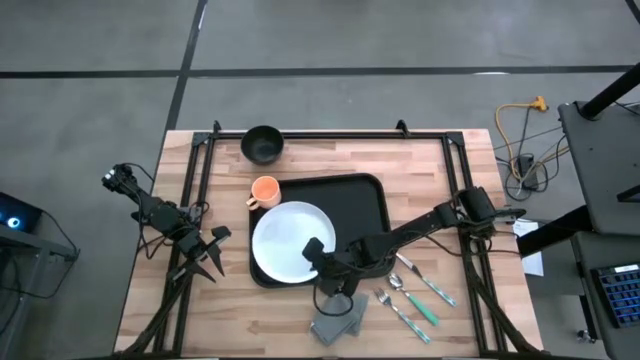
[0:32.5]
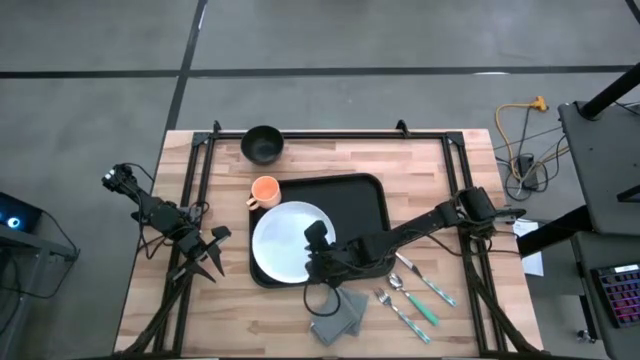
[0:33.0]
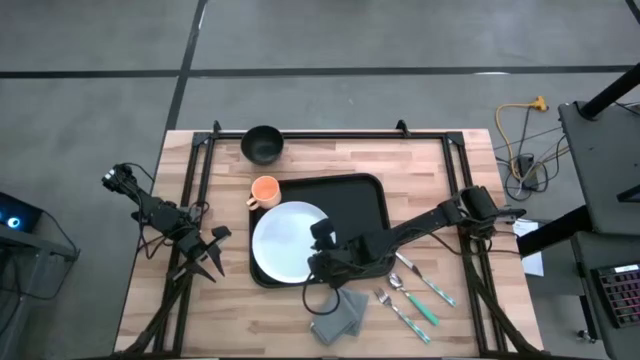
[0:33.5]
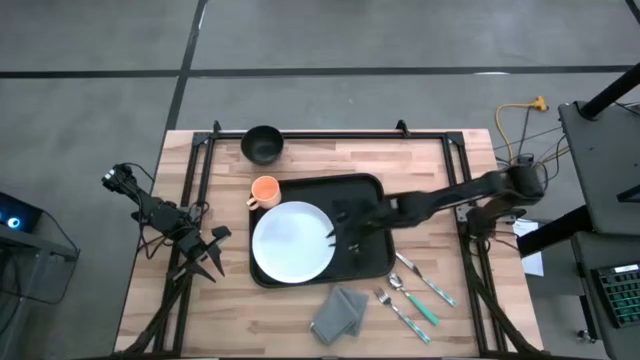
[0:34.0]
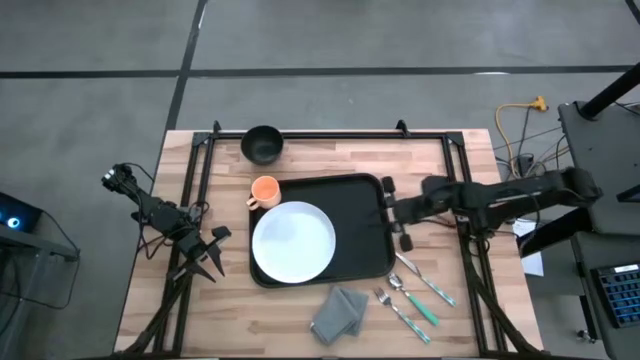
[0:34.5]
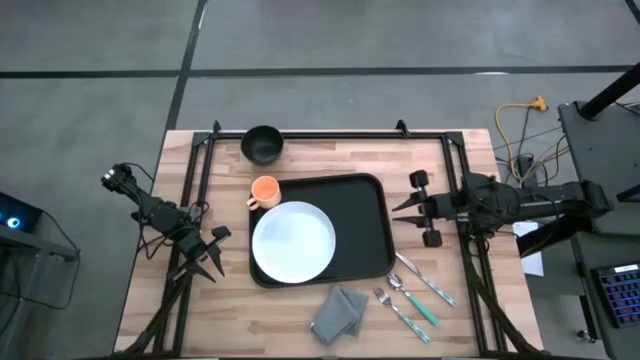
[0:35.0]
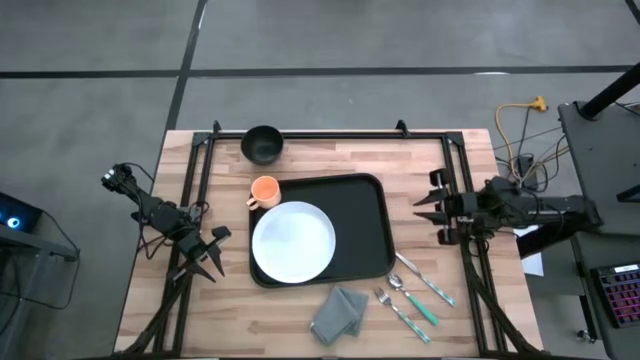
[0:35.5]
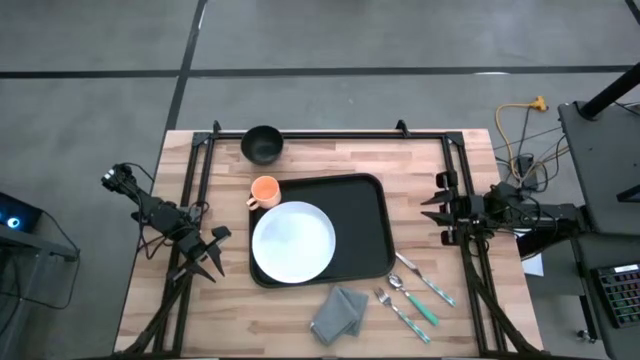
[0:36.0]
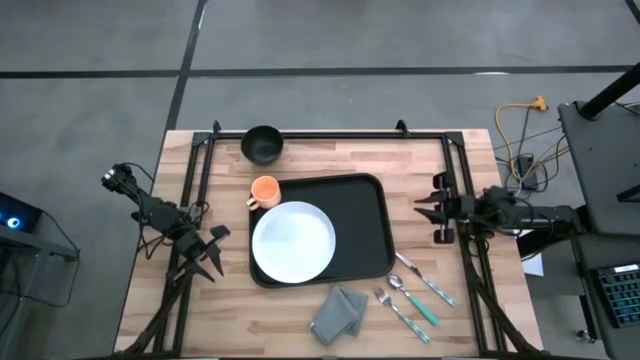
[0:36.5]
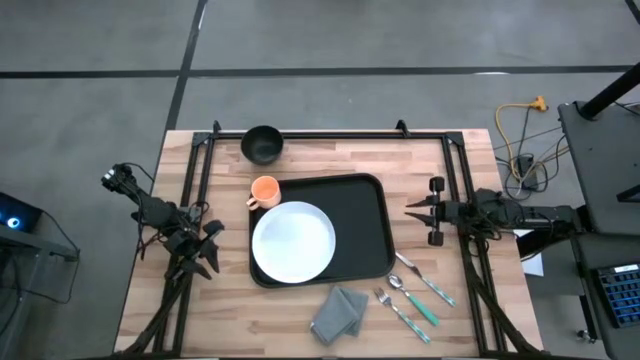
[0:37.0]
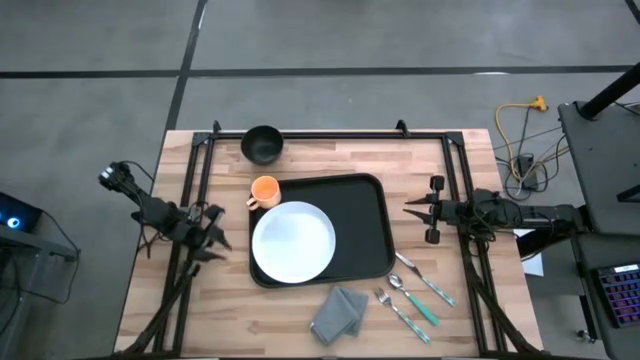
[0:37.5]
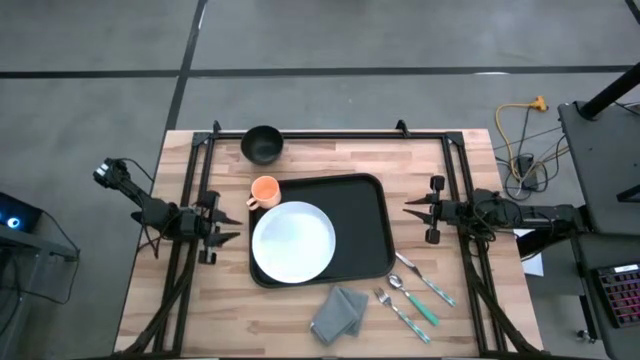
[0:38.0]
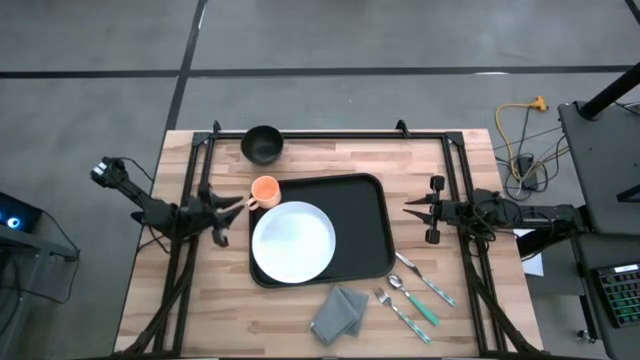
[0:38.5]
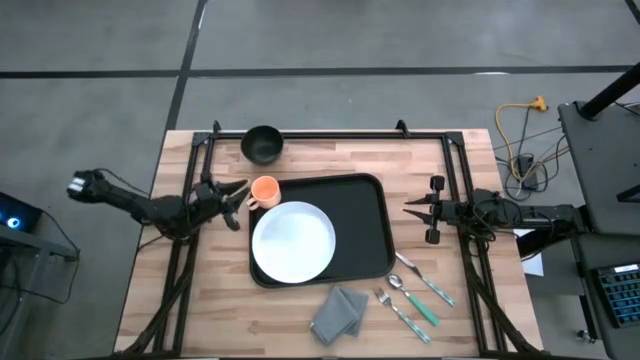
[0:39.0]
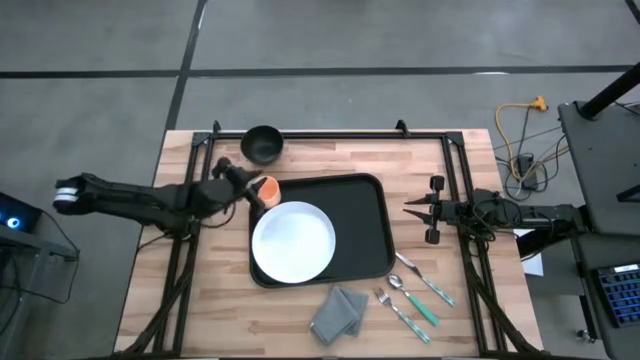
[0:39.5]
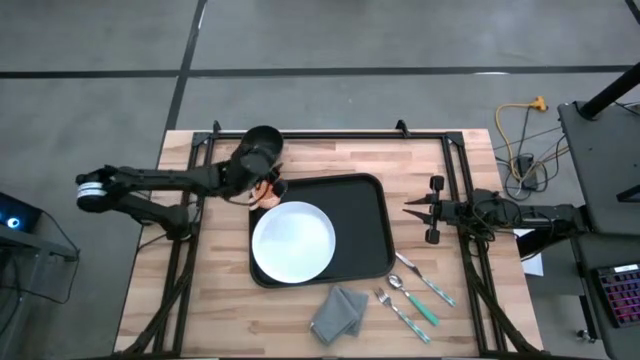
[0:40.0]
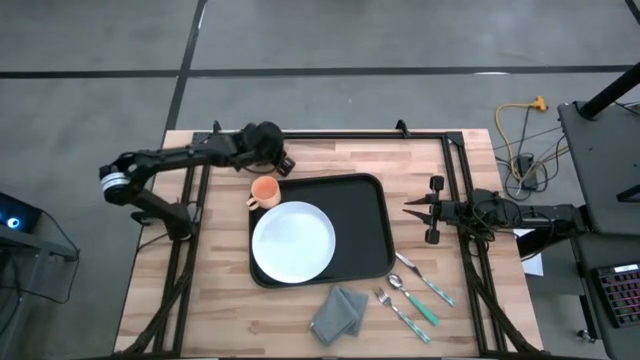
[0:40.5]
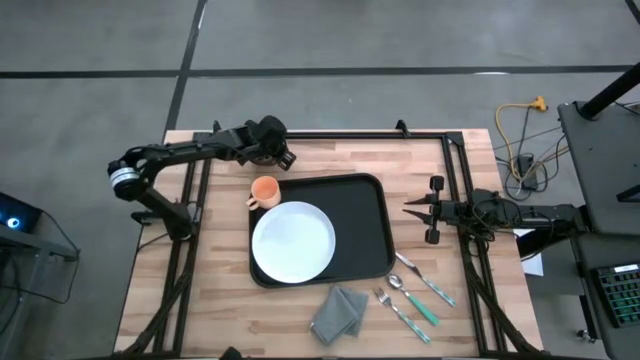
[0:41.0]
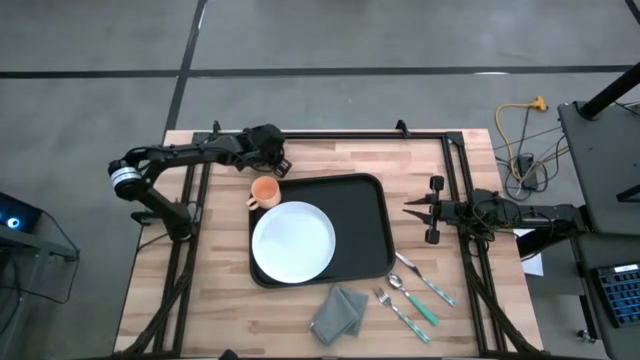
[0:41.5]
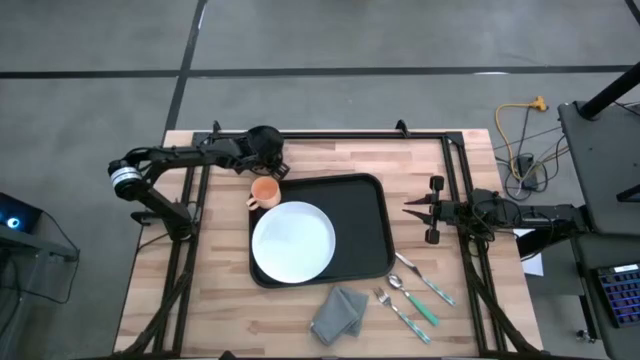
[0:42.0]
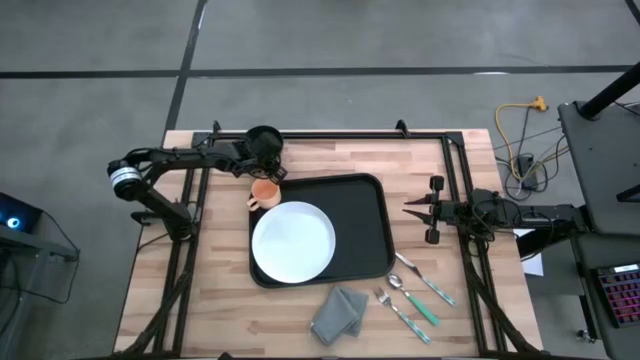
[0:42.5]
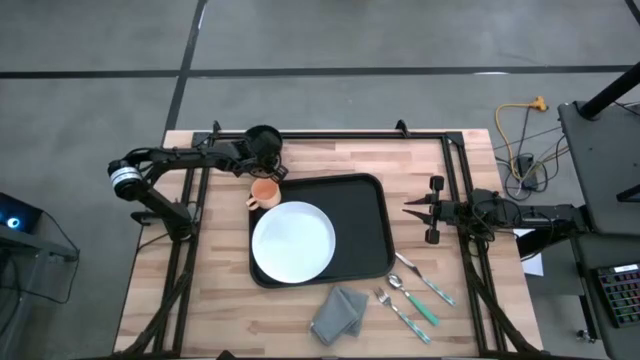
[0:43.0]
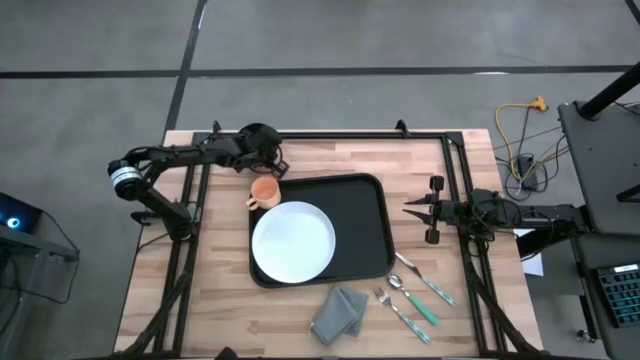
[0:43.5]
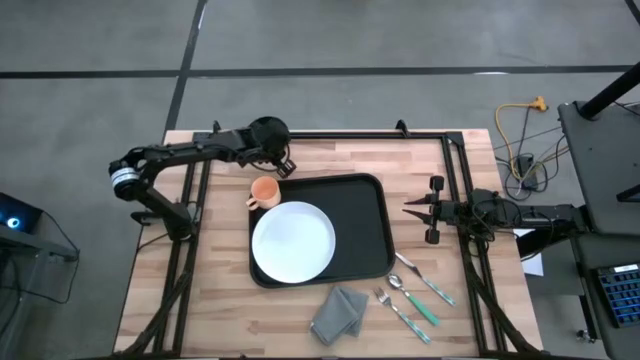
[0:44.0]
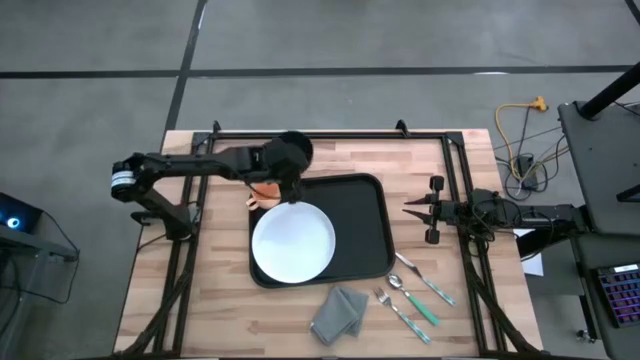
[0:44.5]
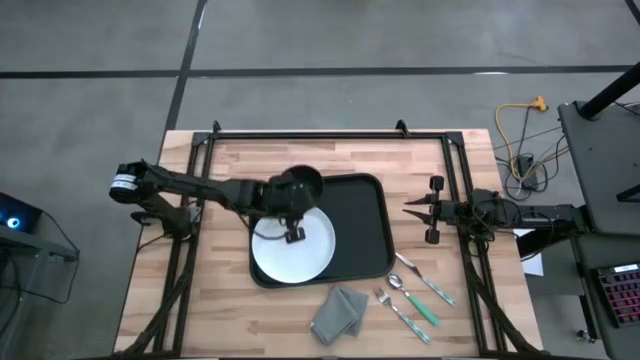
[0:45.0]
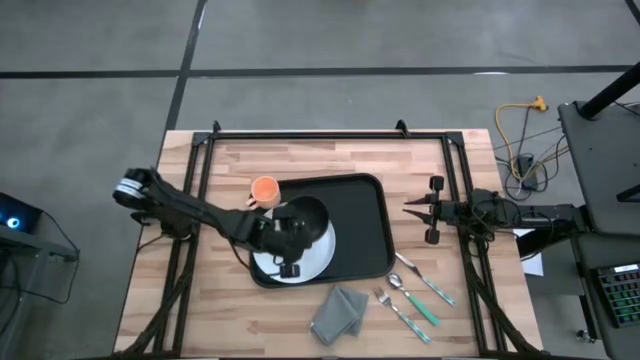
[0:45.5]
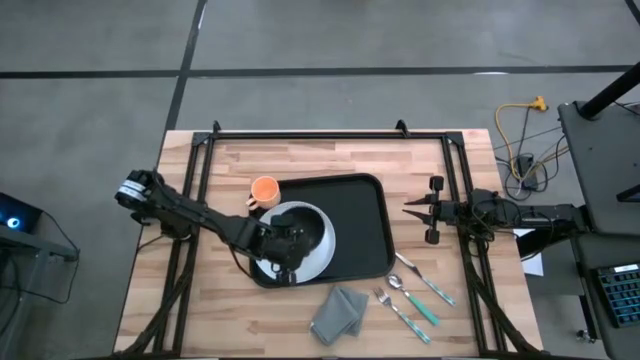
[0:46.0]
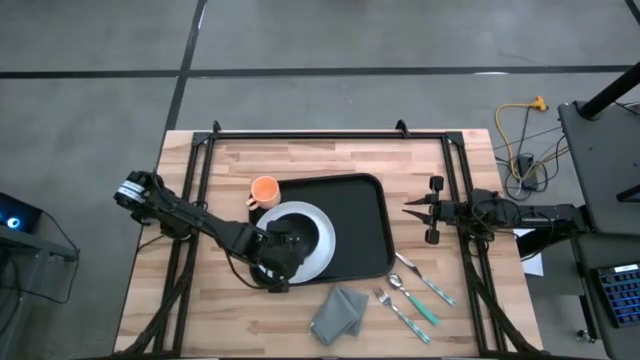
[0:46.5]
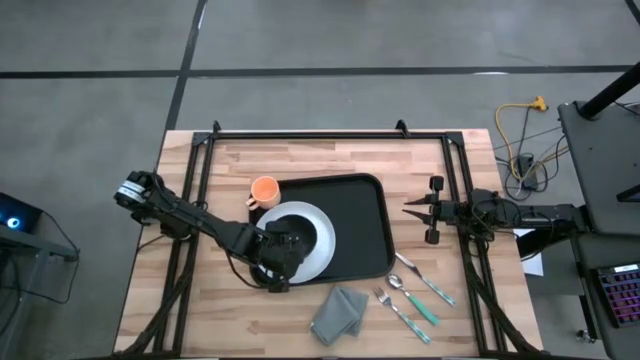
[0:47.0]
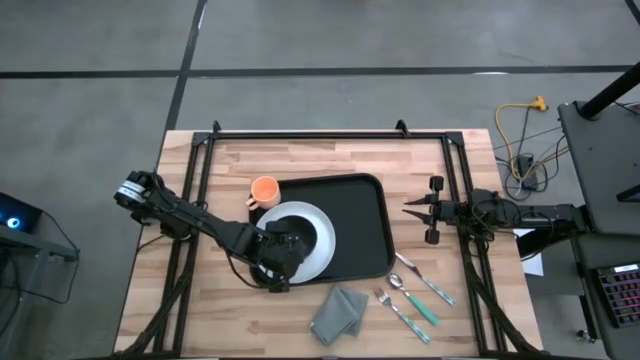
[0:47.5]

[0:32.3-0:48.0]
Task: Set up tray
Put the black bowl on the white plate at the bottom of the orange mug

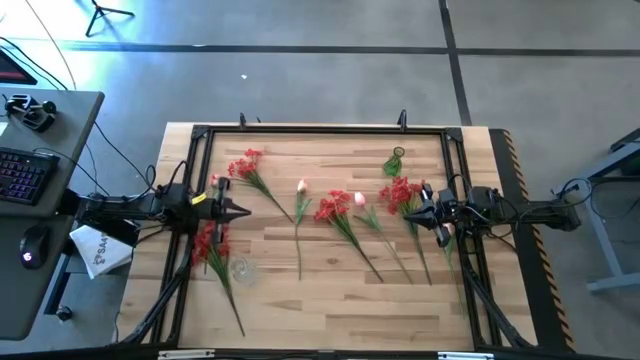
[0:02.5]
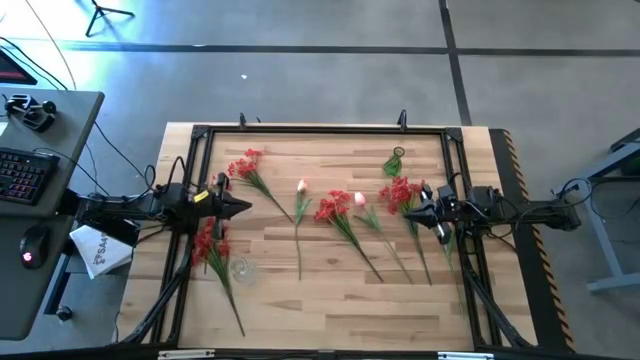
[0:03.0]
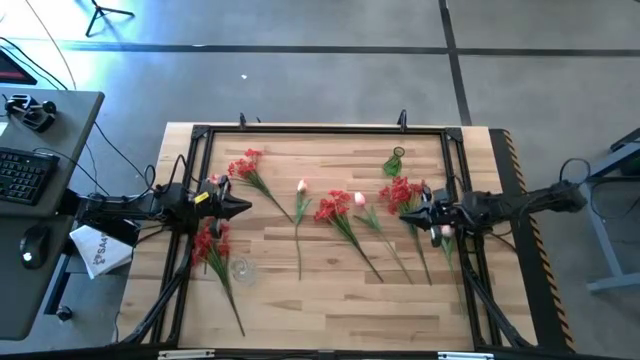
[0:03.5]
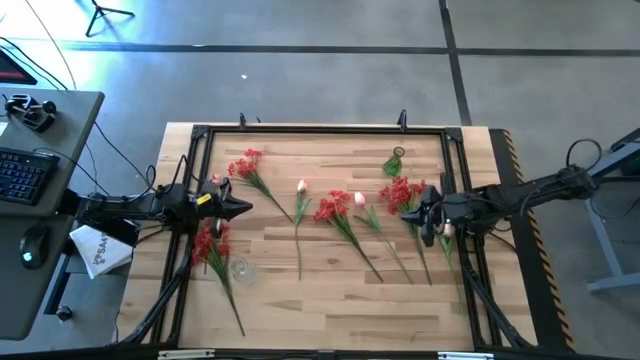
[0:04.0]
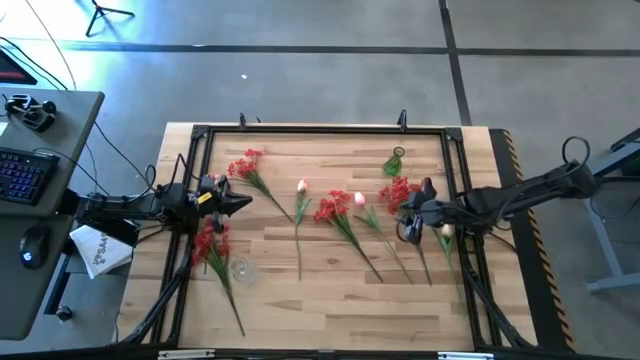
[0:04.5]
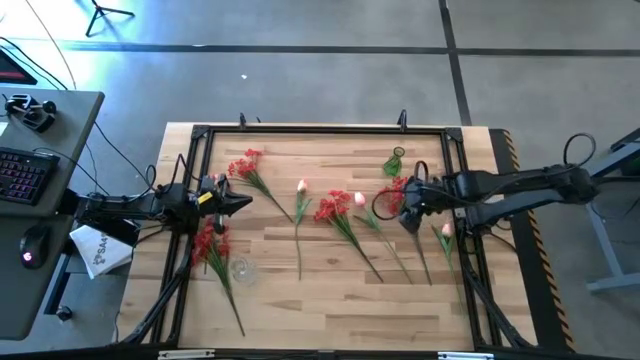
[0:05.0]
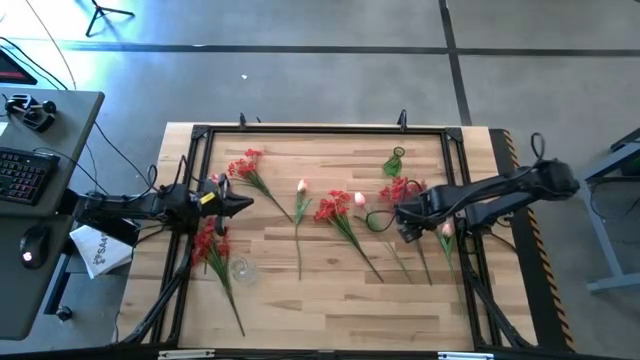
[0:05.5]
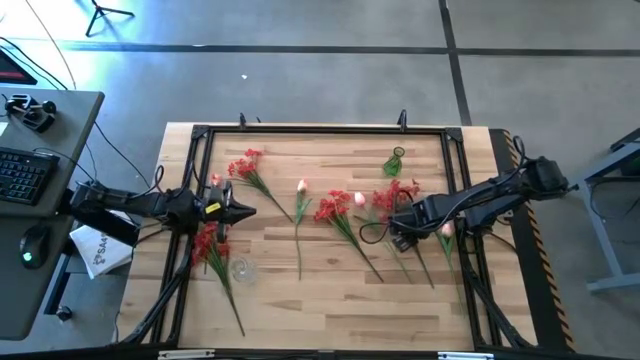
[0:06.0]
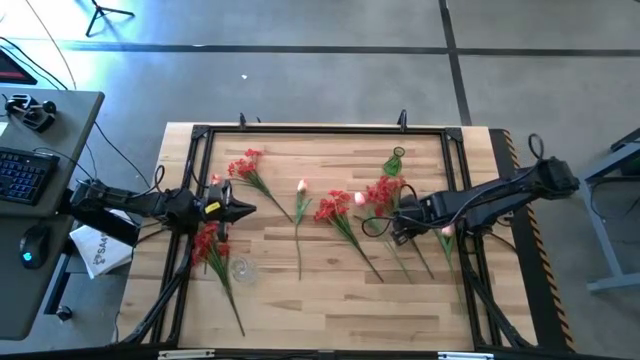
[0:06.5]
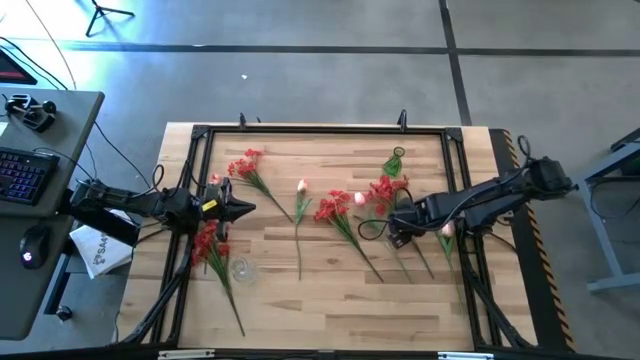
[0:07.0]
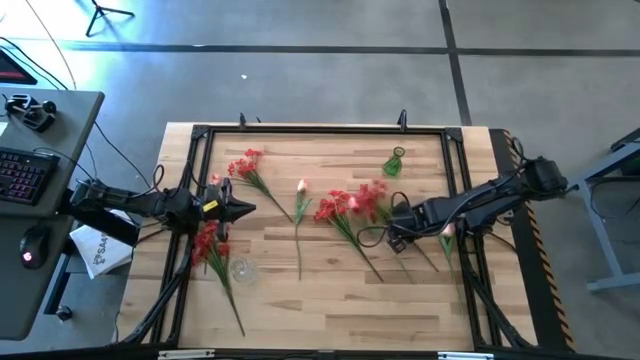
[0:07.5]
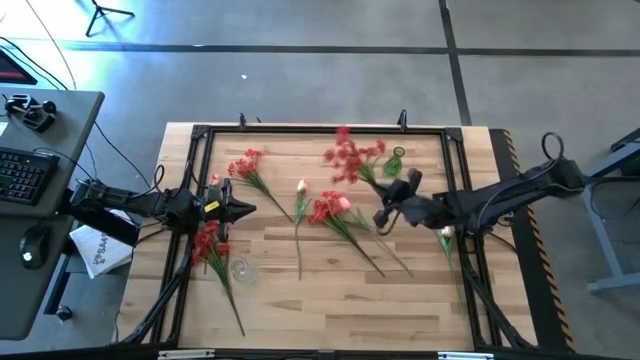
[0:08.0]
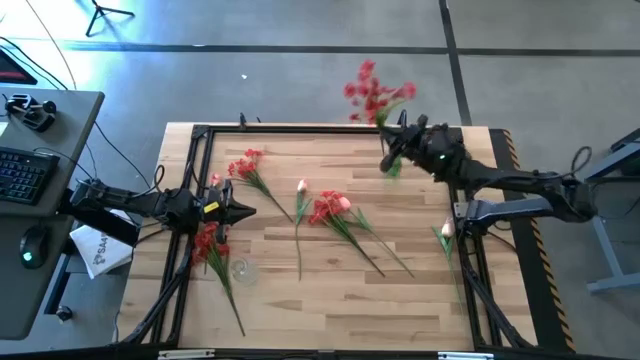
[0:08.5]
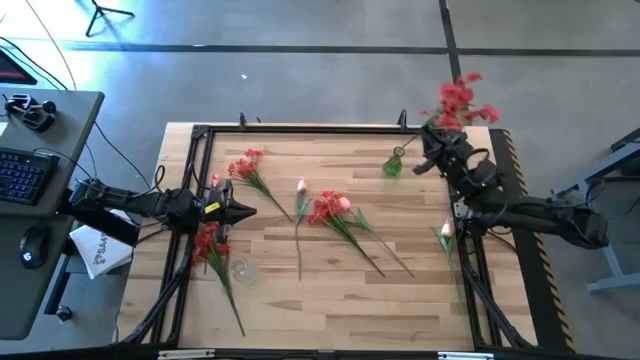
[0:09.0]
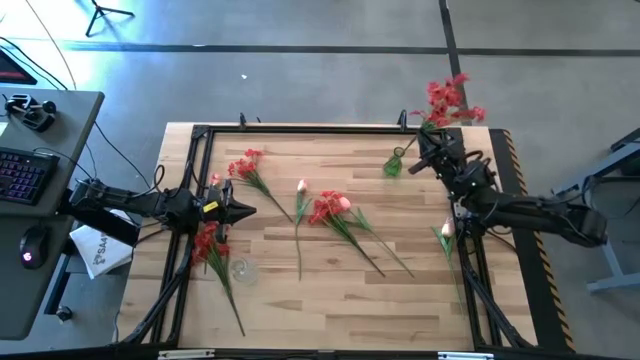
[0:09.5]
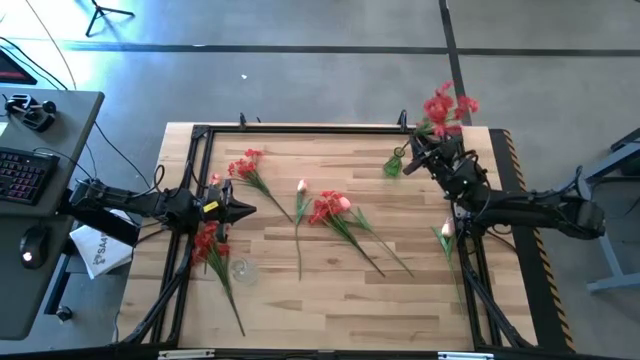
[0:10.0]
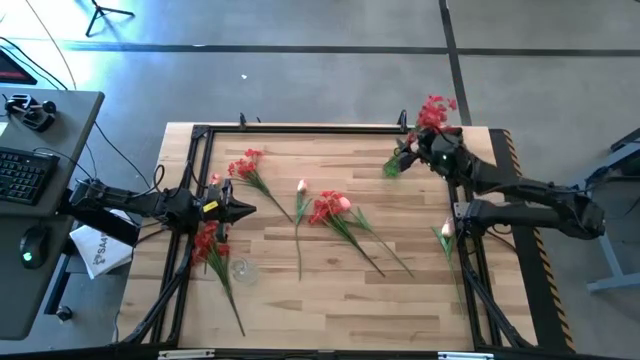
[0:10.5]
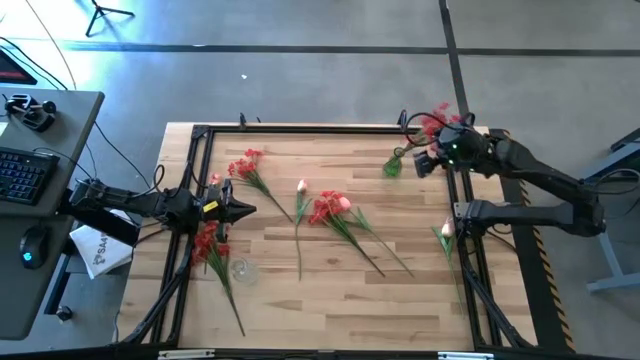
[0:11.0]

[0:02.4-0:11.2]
Task: Sort flowers into vase by color
Put the red flowers into the green vase
